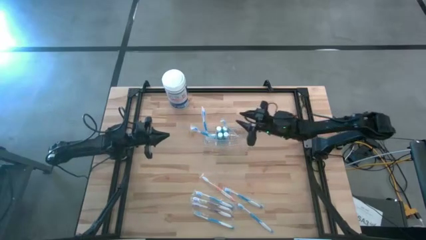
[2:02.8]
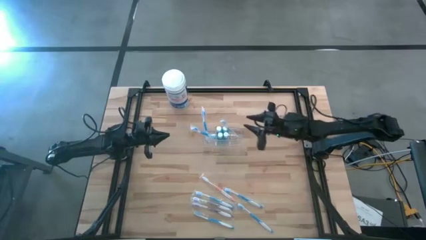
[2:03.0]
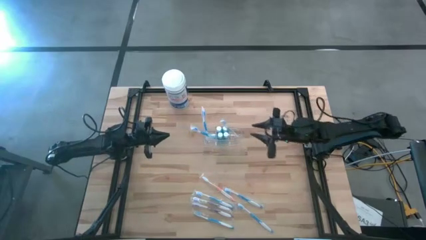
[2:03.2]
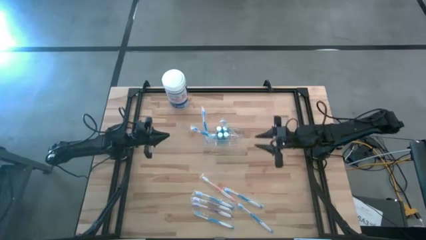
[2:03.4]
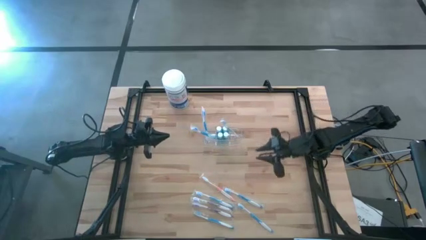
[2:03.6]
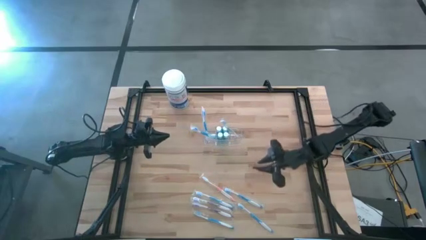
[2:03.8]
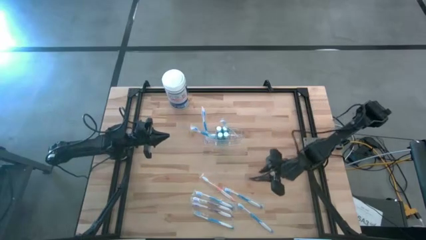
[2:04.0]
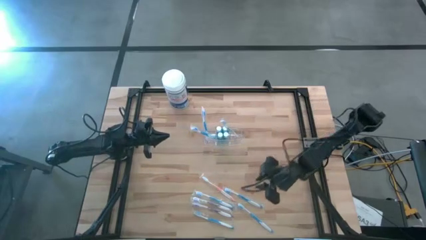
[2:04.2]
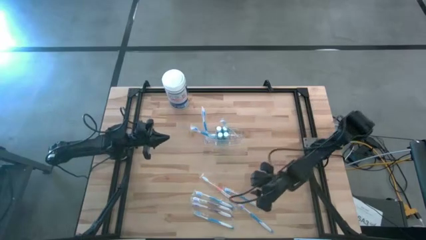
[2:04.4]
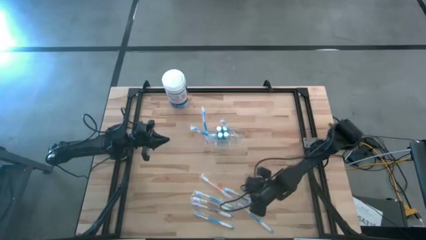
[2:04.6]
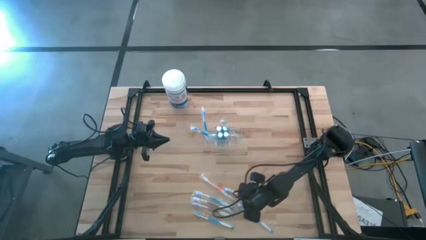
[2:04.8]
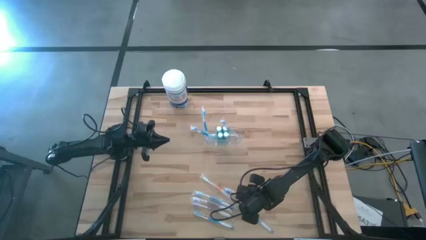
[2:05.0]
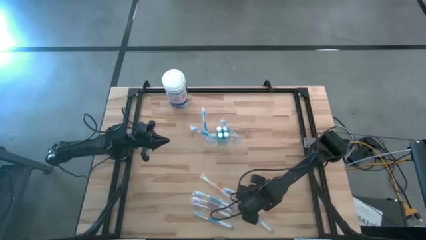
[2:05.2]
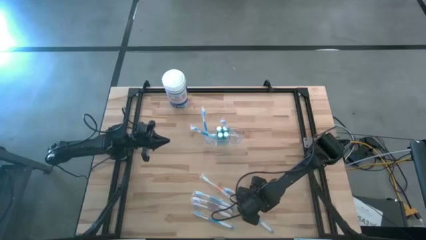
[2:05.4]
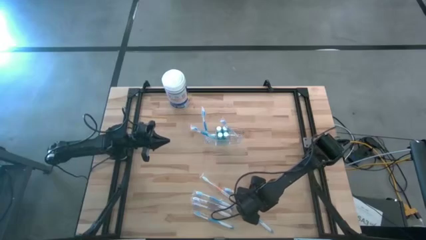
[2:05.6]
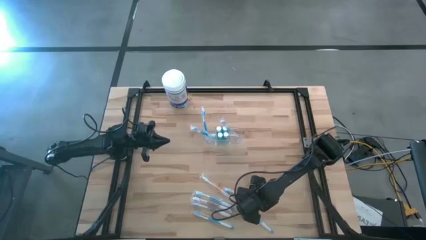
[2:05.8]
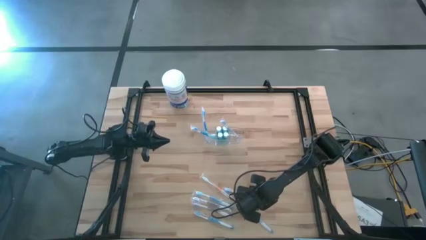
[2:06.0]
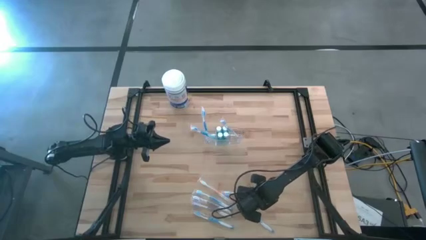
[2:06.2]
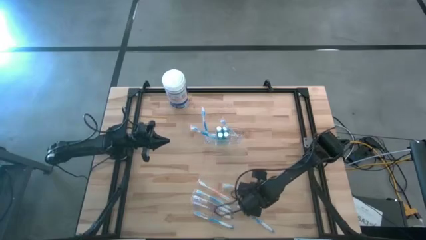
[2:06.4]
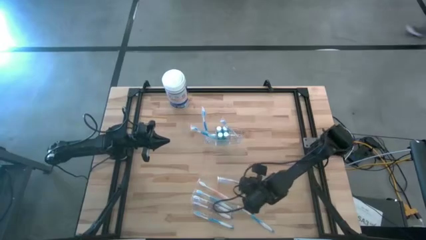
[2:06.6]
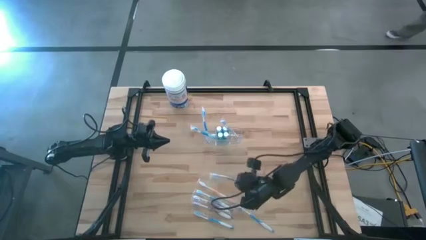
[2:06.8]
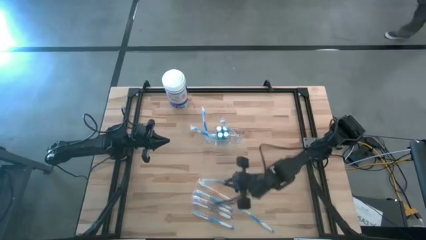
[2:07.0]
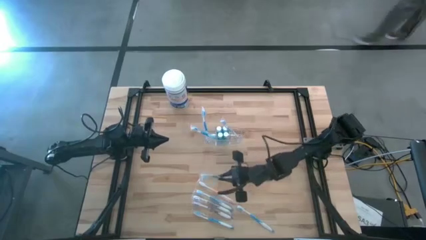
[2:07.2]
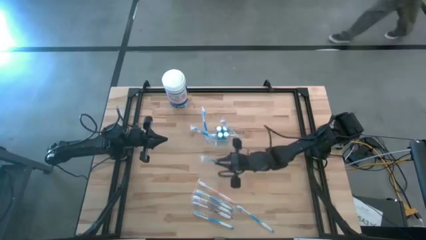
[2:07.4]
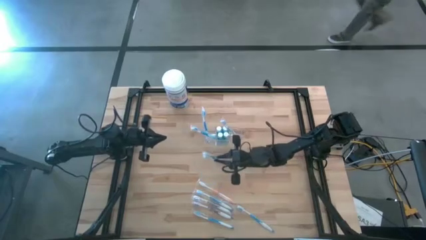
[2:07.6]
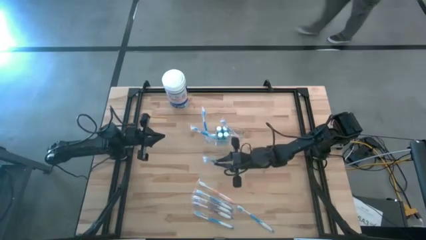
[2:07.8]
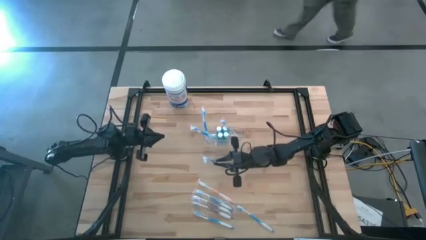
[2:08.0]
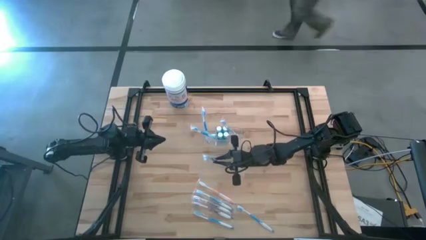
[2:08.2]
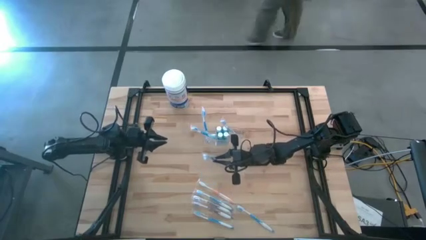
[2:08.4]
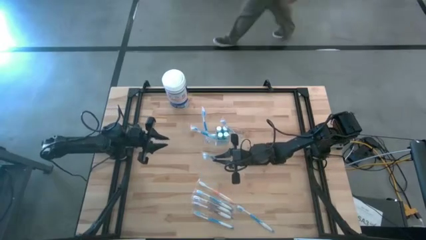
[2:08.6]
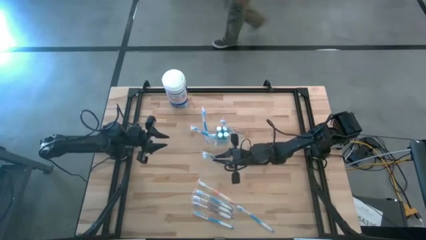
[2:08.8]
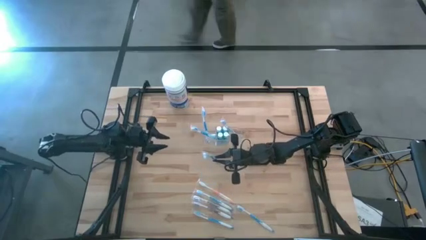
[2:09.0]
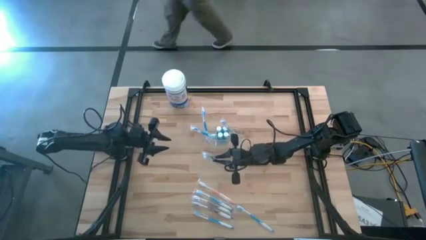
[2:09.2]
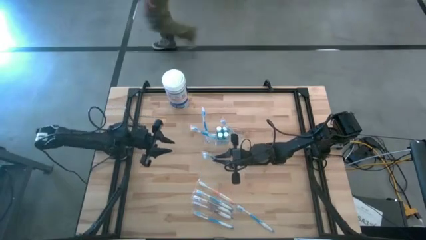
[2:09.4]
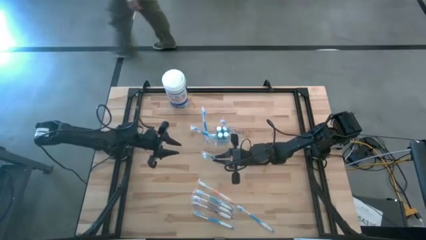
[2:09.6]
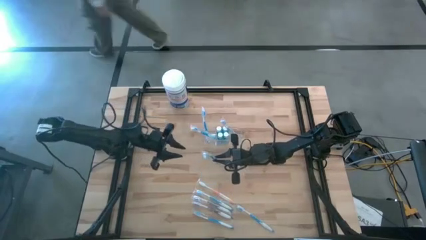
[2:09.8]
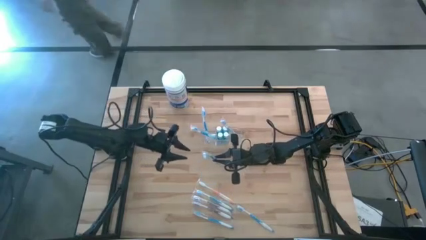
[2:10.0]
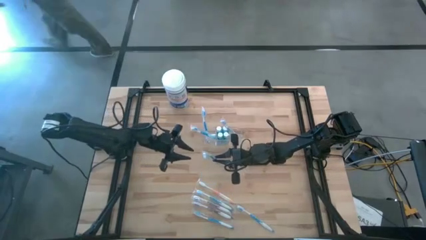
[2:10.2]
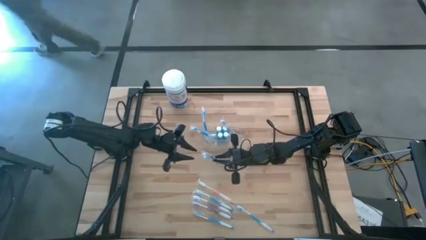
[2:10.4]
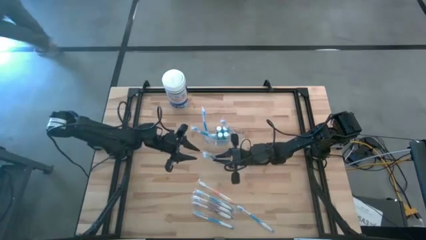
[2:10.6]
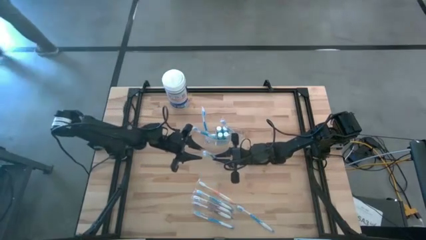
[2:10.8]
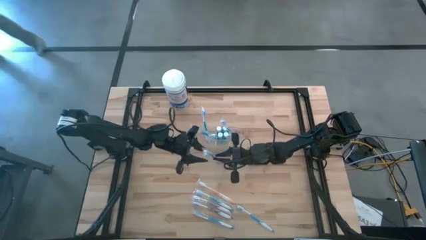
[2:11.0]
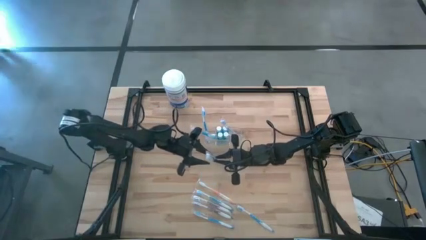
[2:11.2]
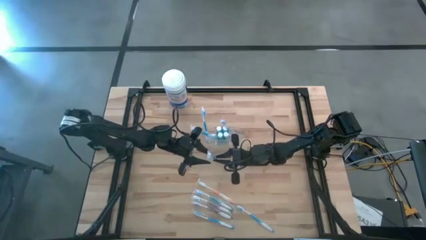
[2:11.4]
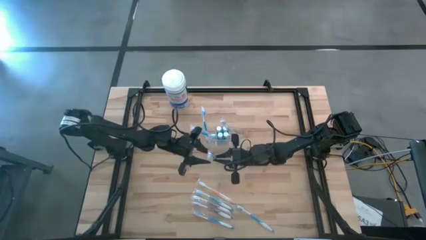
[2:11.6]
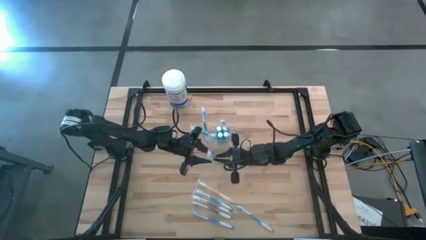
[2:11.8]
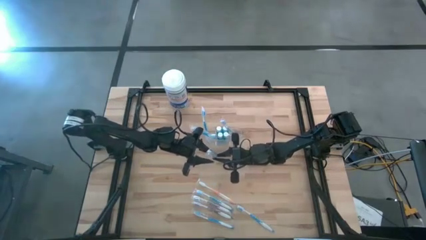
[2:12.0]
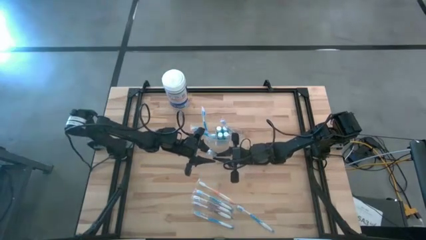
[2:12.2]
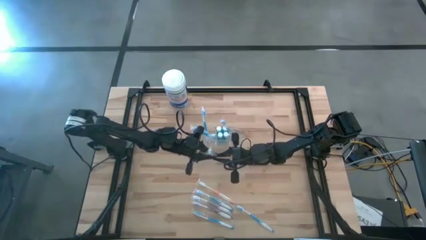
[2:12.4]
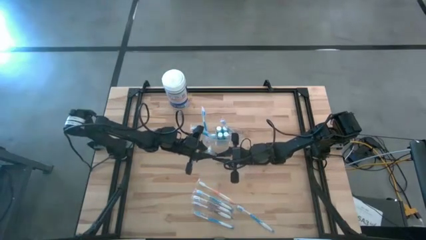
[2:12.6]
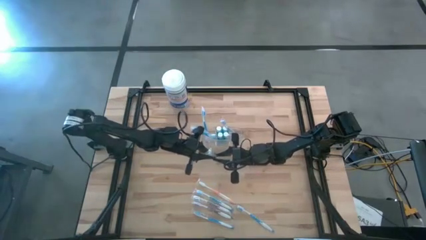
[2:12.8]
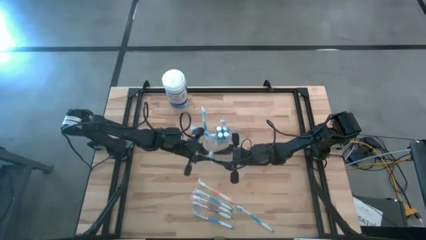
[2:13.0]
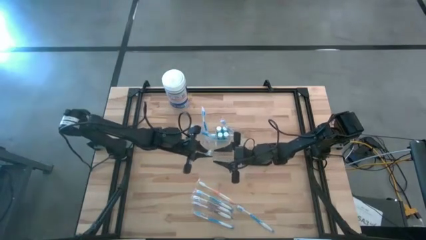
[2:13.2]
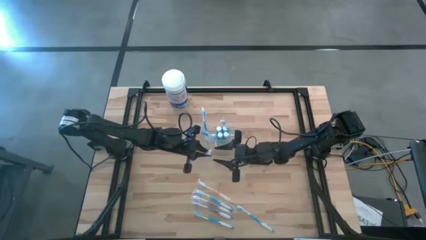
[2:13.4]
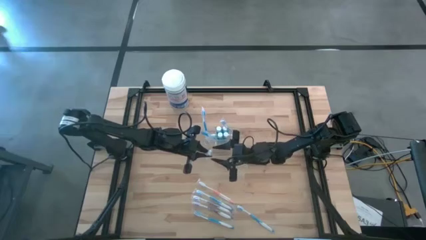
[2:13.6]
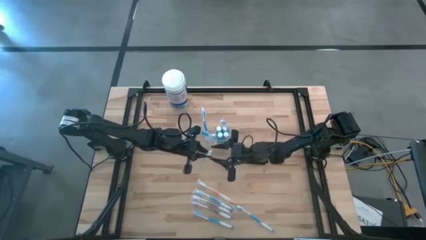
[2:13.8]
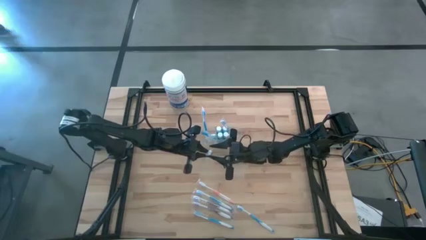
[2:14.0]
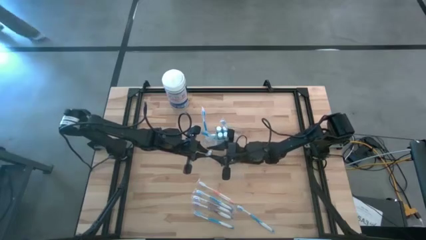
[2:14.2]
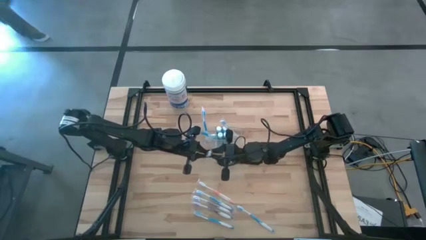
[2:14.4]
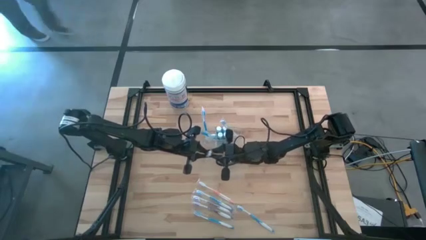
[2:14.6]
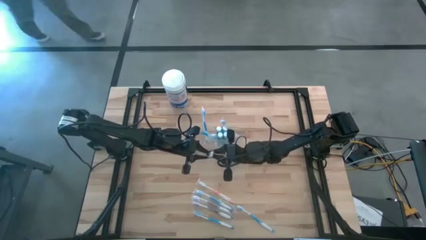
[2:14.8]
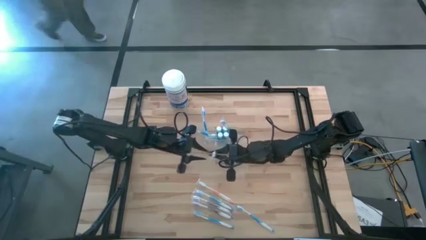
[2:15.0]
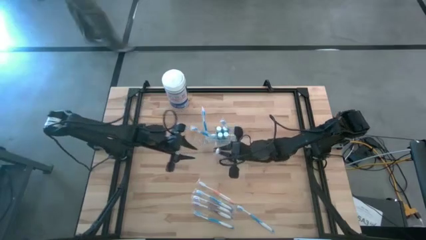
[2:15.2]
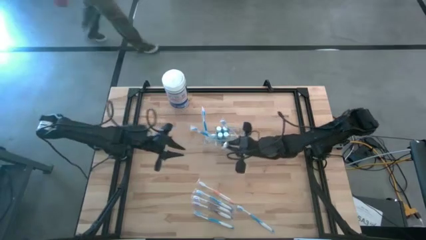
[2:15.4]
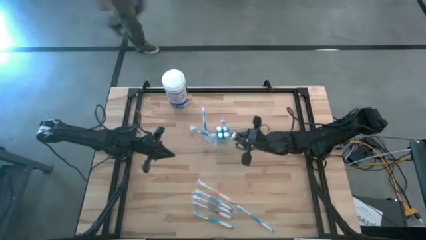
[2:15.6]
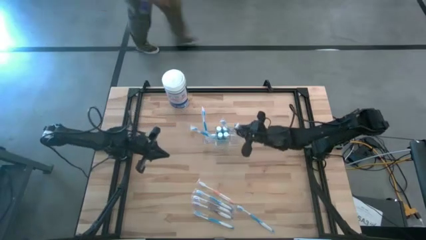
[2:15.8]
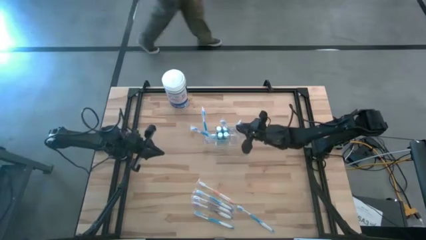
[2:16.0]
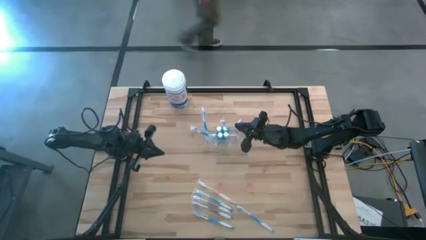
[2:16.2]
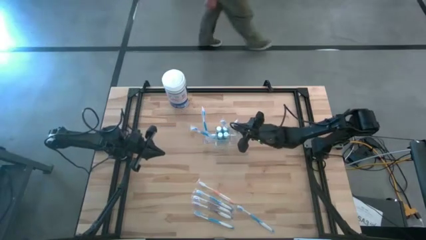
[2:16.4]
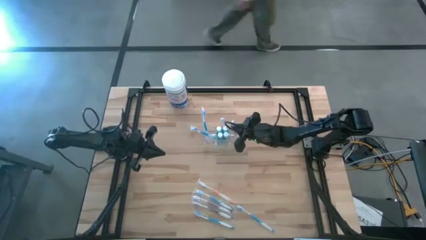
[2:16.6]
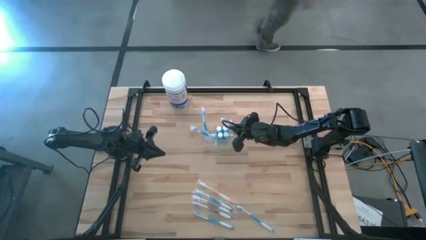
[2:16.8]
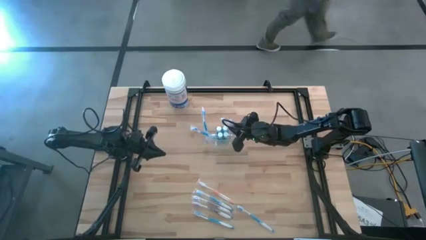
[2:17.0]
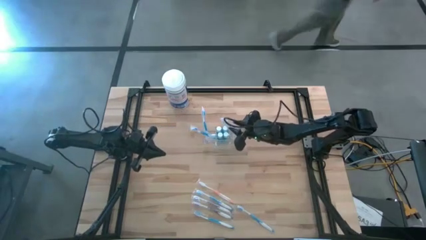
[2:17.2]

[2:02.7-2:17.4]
Task: Pick & Place toothbrushing station
Put the blue toothbrush in the transparent organizer

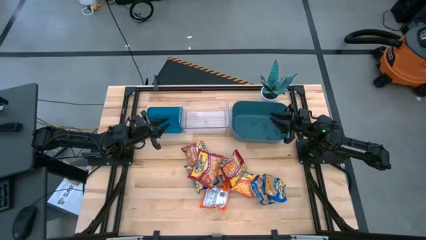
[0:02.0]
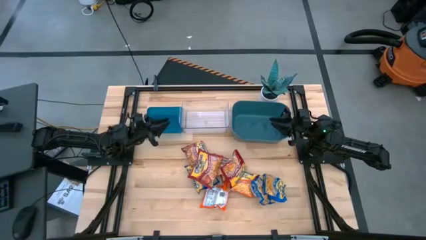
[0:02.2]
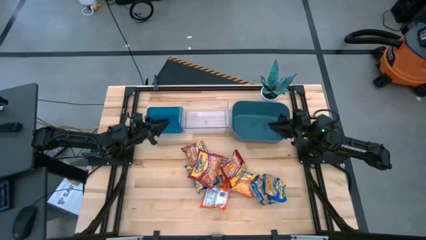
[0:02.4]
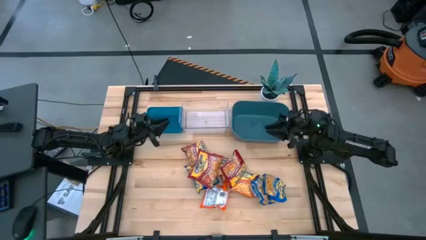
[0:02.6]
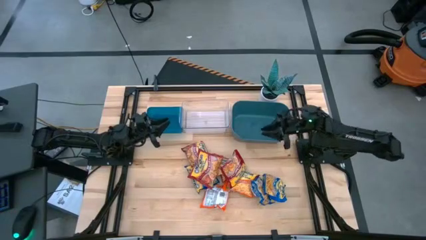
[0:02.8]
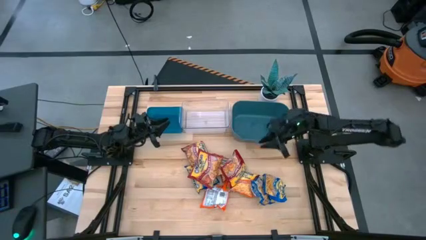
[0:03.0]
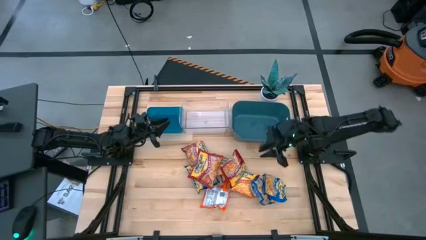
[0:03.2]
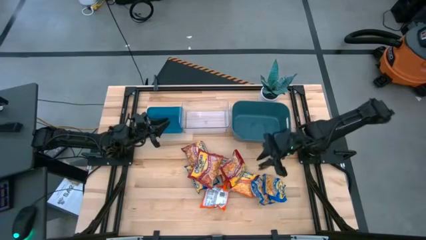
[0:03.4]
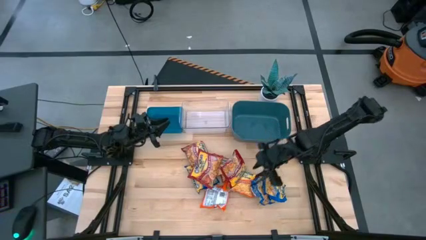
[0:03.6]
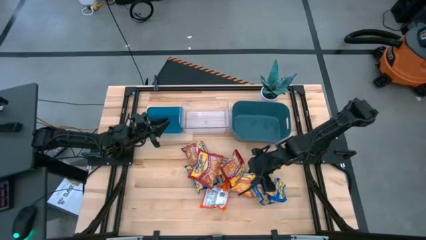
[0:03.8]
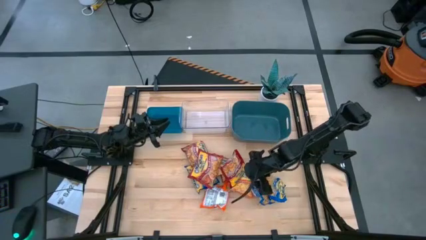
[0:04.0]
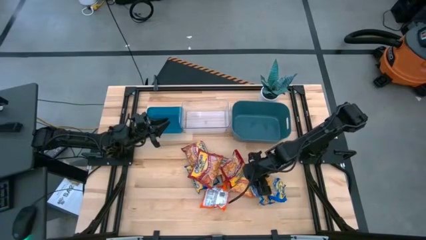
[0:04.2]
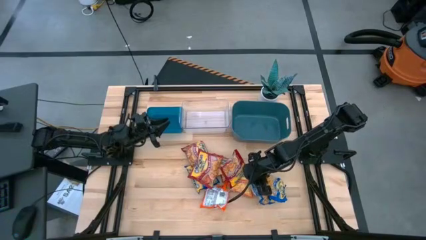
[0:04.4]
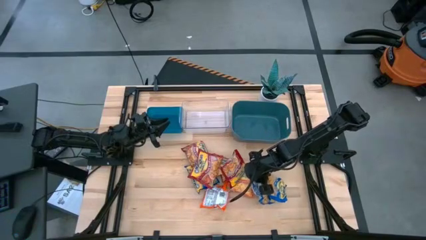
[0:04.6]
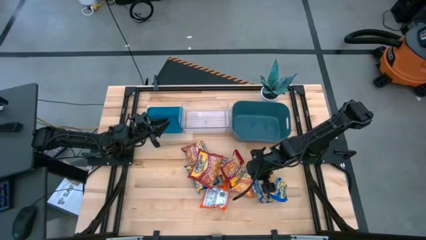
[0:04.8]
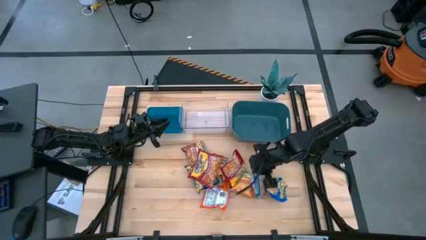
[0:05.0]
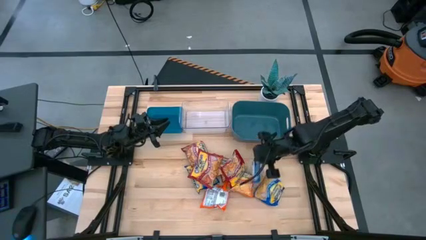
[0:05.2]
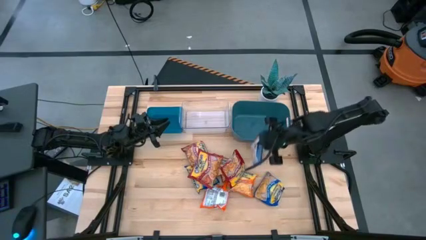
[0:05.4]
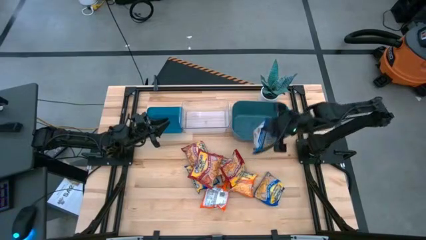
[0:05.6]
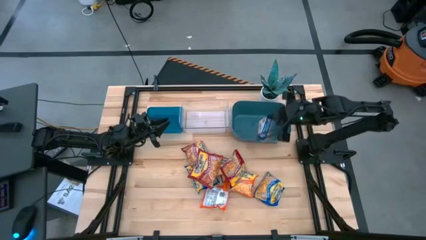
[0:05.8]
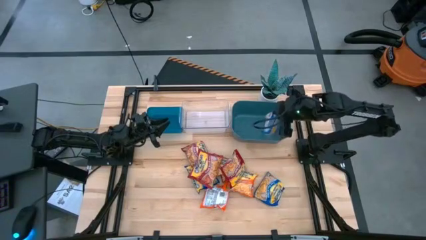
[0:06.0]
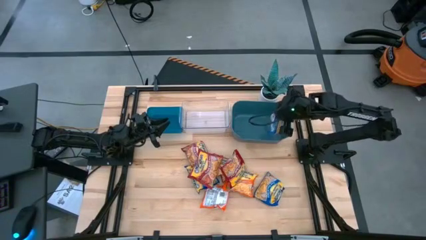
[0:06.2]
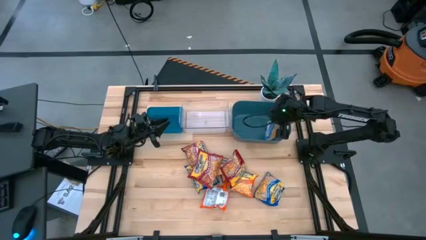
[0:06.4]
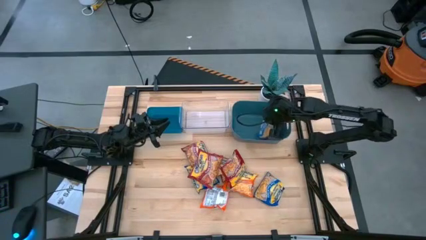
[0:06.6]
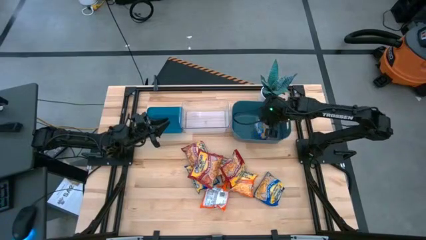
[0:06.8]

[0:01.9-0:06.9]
Task: Sort Maruchan noodles
Put the blue noodle pack into the green bin
